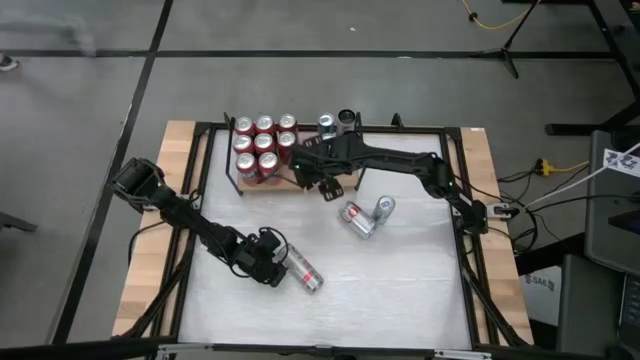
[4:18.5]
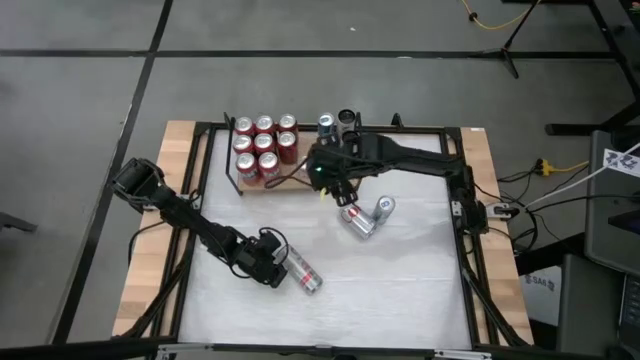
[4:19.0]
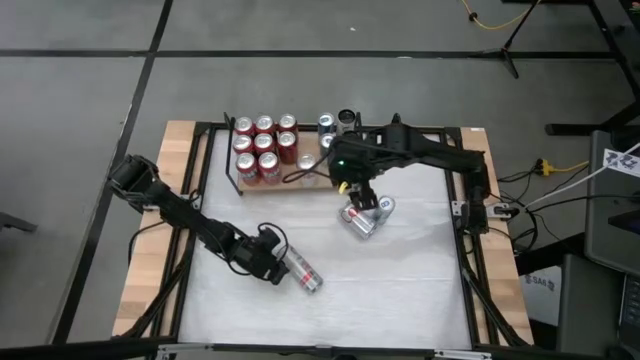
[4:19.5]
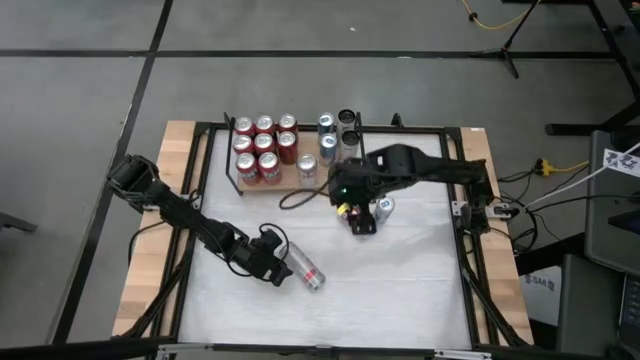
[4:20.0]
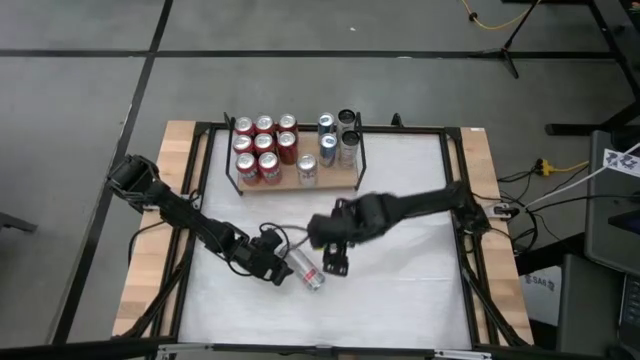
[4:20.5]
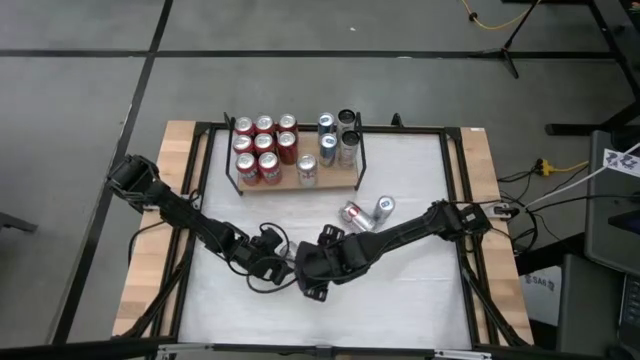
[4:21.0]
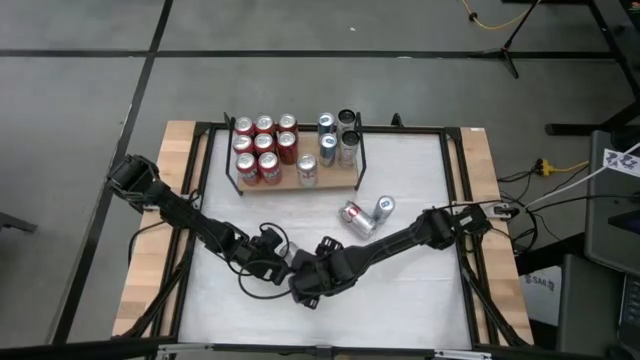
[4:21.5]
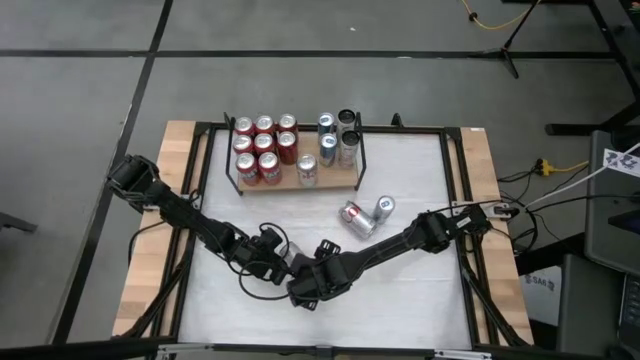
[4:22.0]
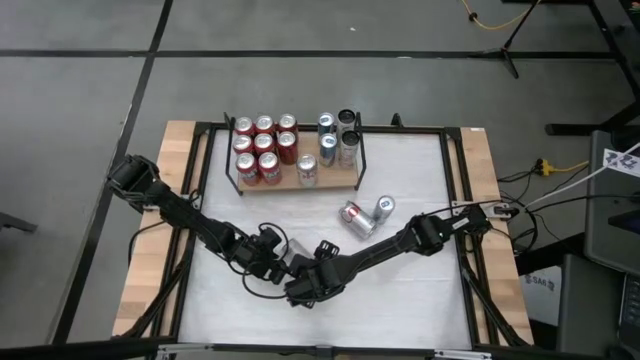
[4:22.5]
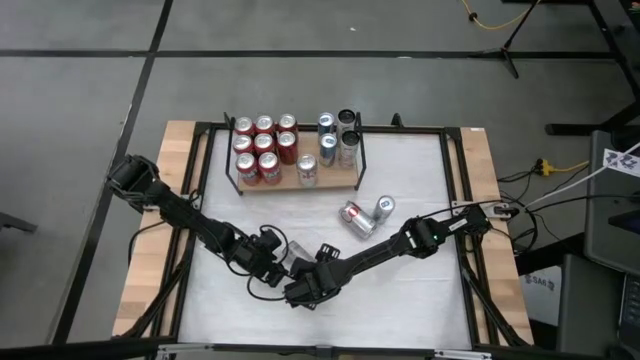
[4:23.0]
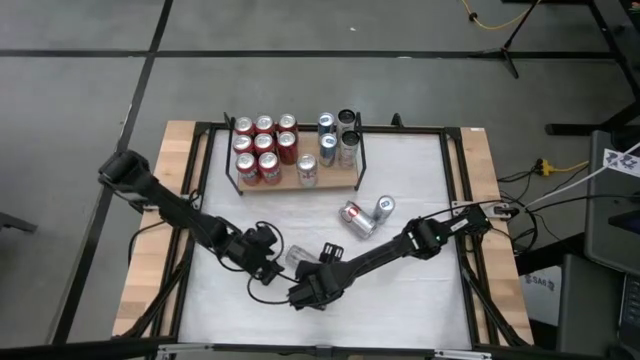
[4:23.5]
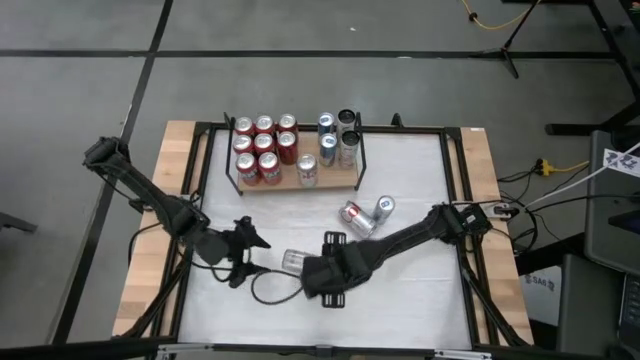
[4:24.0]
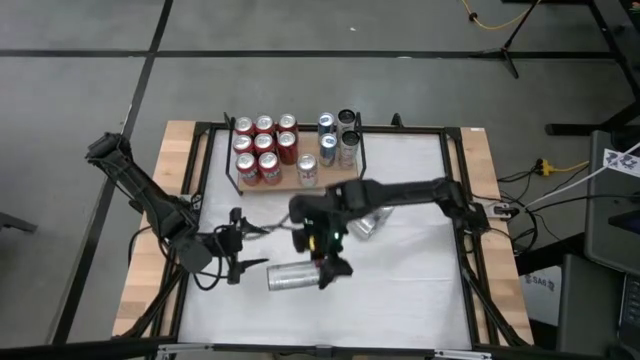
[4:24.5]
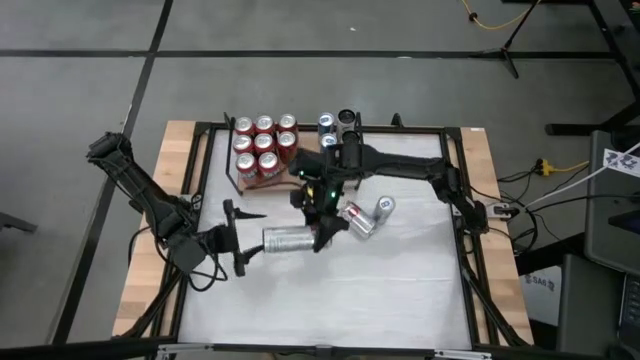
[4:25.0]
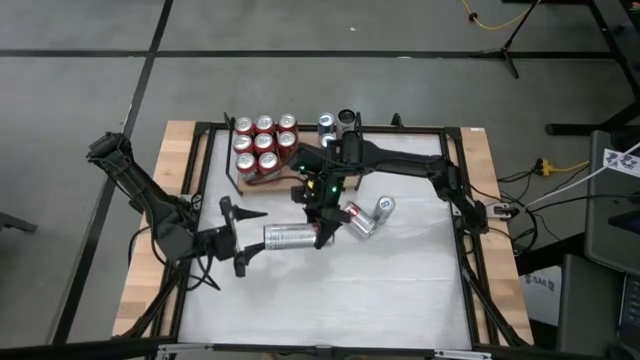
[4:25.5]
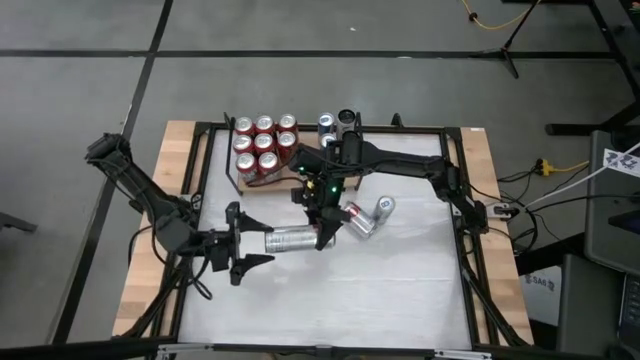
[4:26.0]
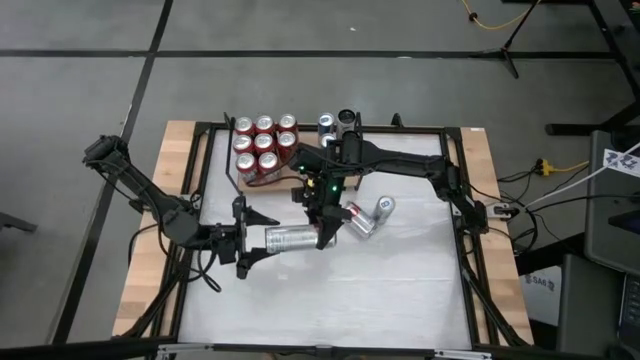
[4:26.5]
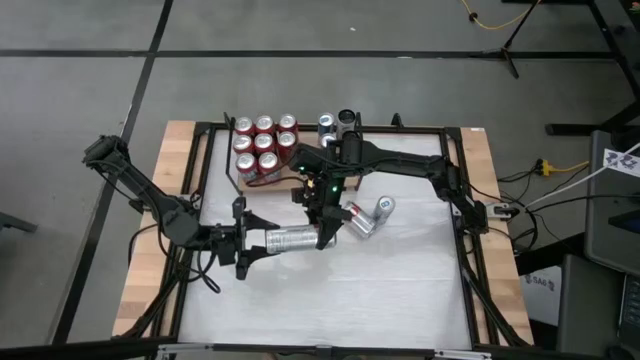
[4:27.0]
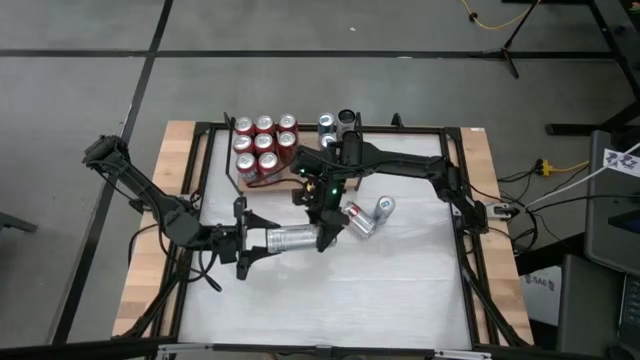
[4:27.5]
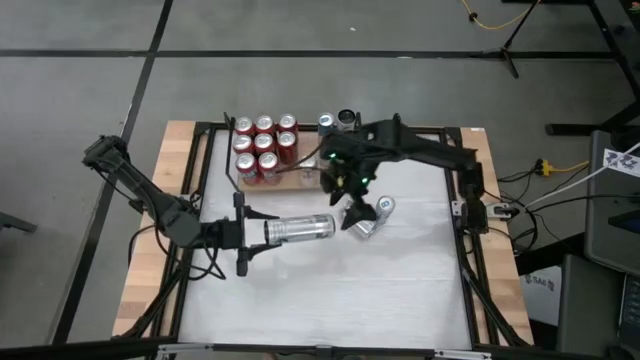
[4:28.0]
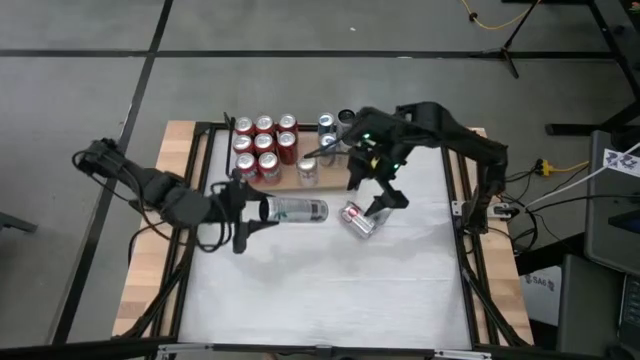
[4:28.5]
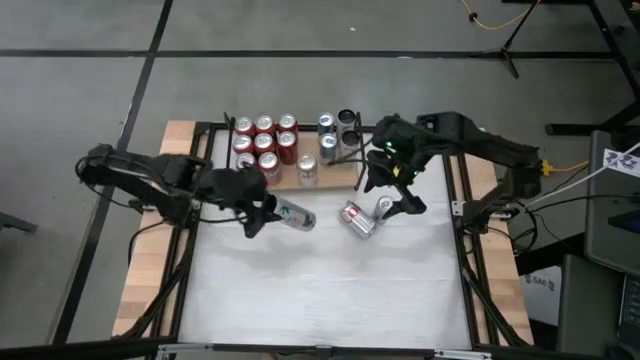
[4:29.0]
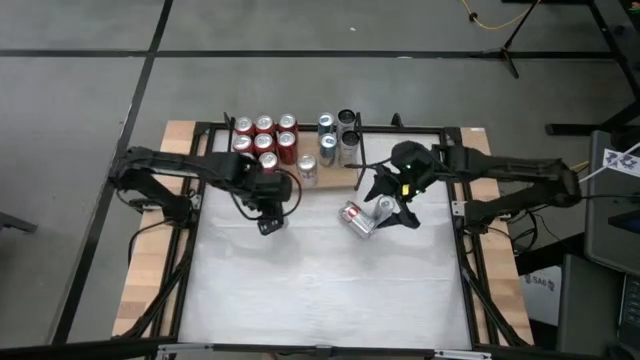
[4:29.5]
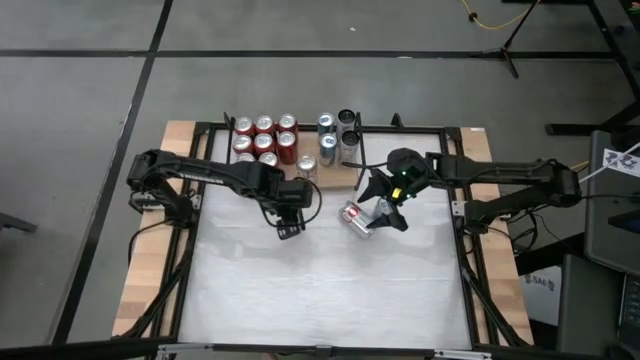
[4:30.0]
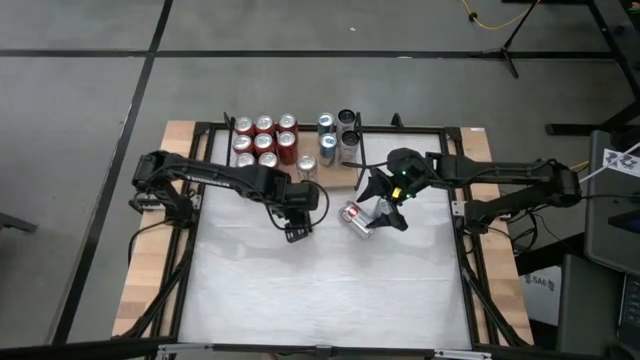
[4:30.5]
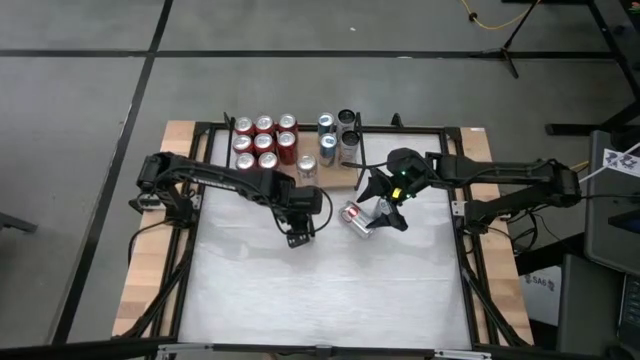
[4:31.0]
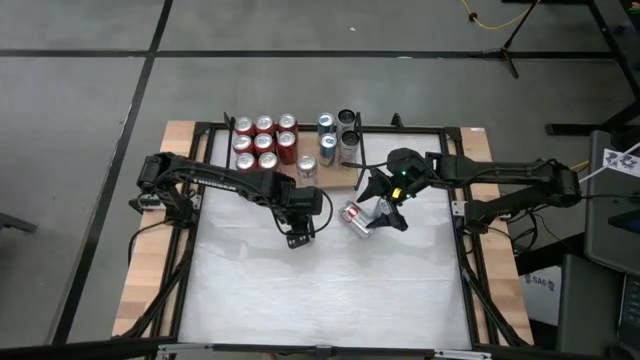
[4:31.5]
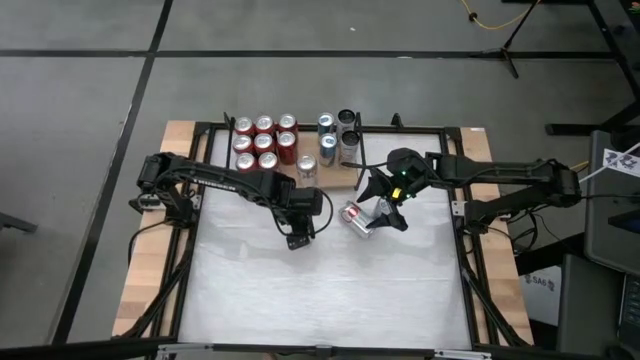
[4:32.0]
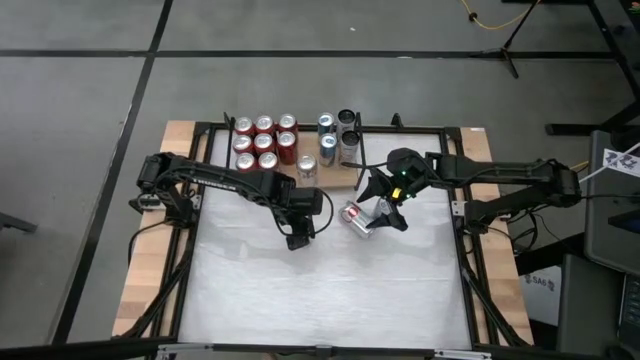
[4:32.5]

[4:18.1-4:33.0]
Task: Place canned beverage on shelf
Adjust the white pink soda can

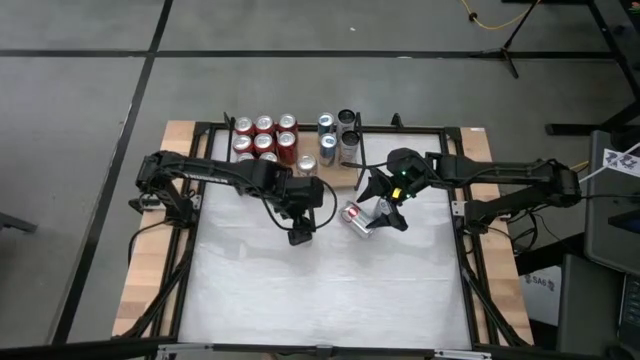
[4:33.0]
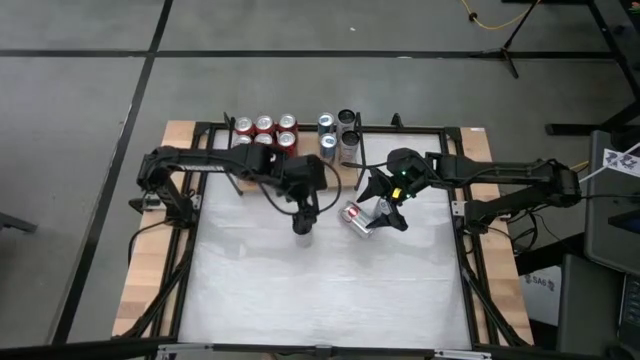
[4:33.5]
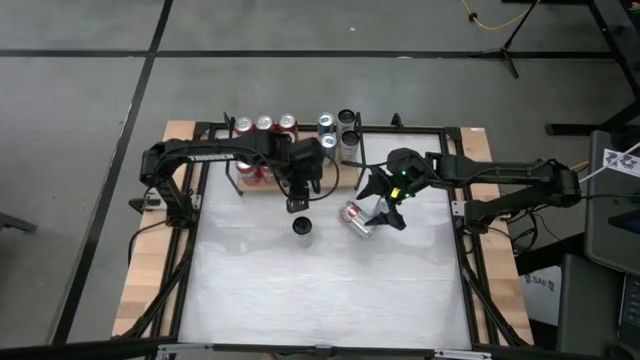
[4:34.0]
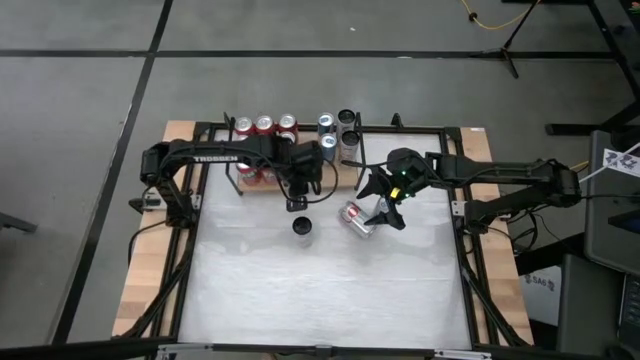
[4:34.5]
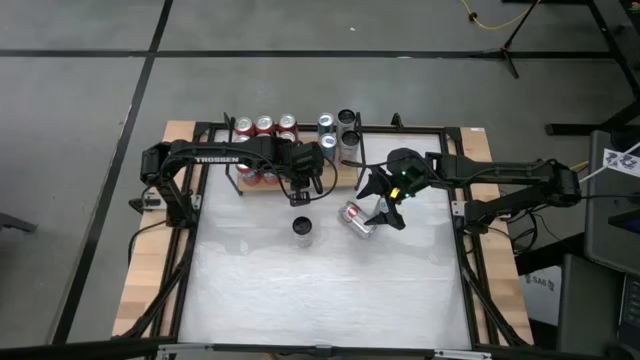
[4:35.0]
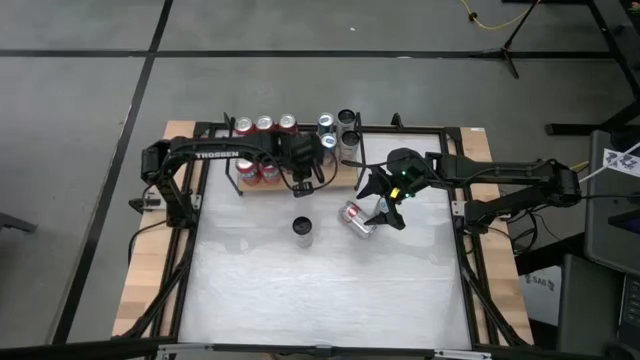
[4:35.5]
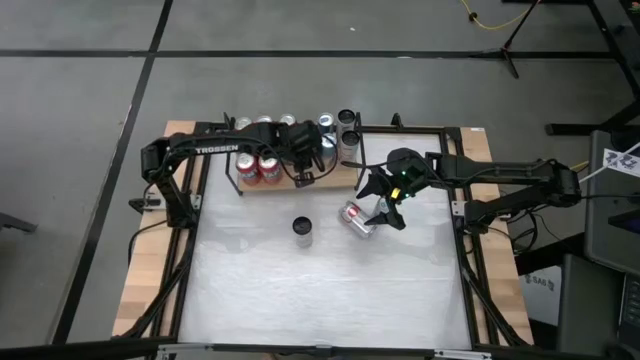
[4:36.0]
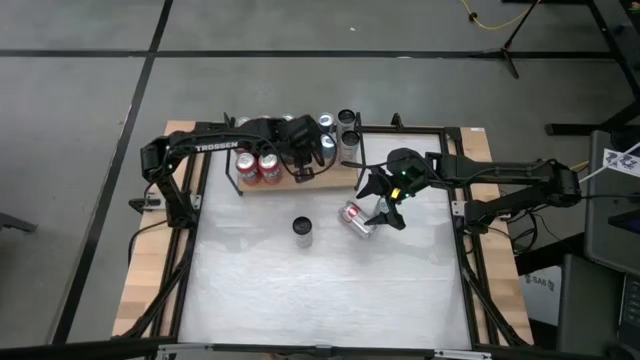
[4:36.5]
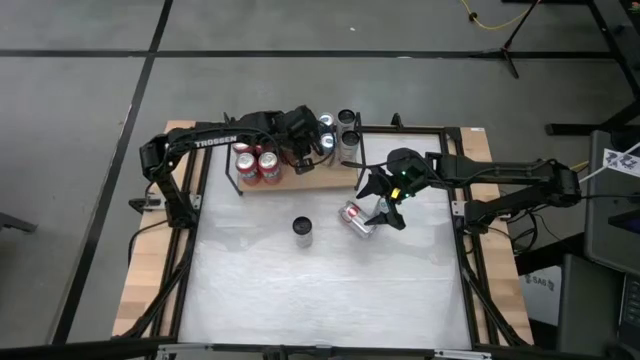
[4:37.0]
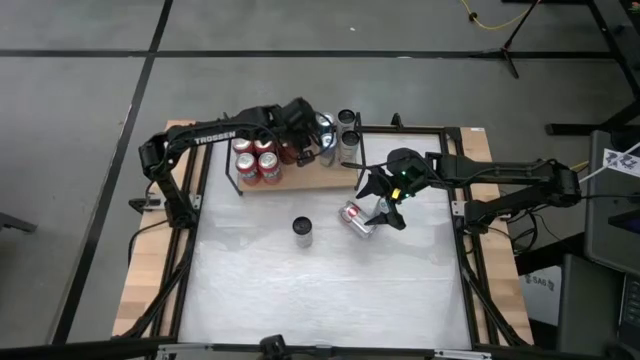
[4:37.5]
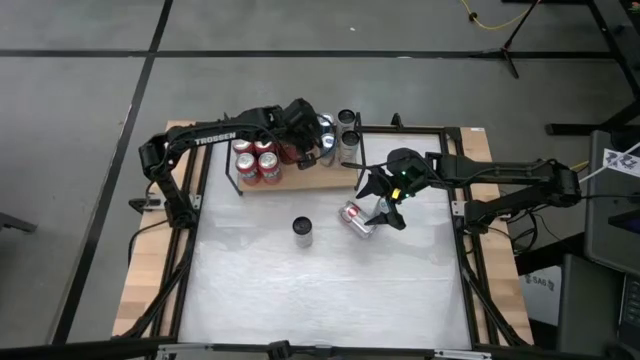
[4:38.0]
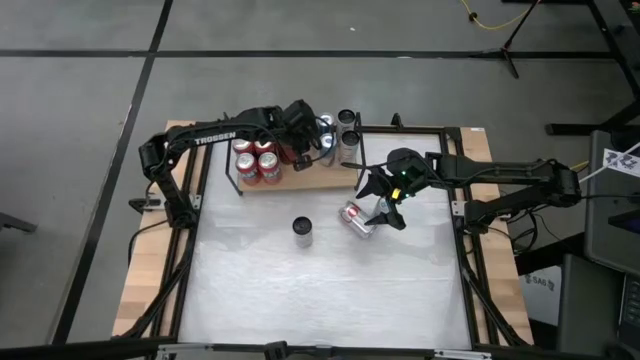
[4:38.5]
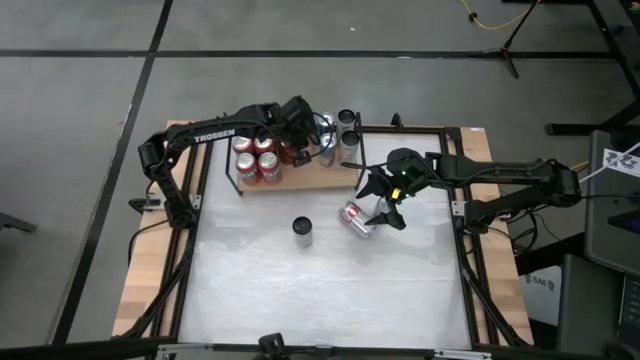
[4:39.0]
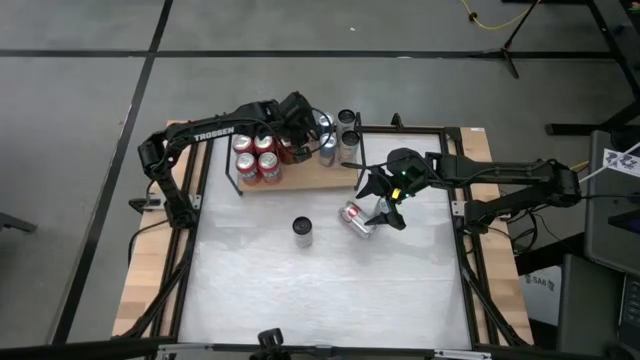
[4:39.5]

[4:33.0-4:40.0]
Adjust the red silver soda can on the shelf

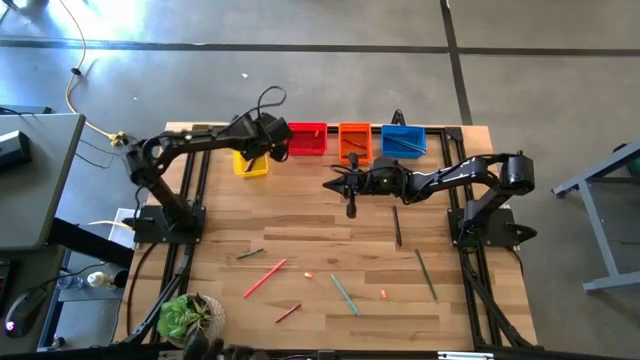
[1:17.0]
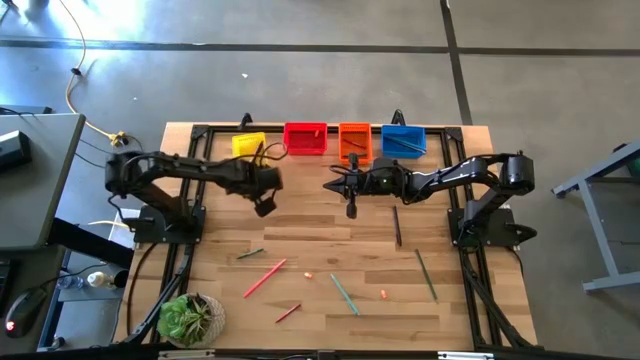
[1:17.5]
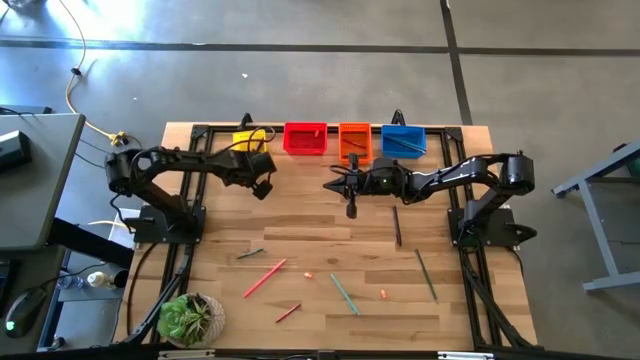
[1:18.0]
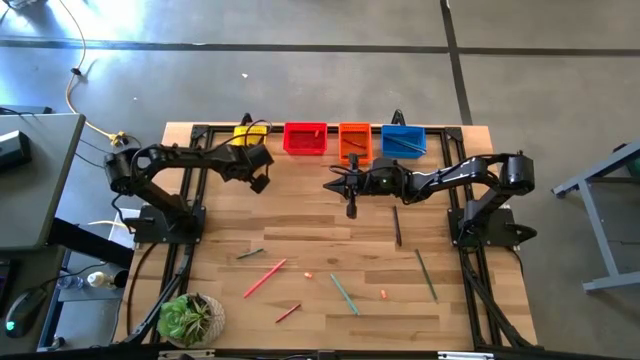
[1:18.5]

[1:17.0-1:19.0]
Task: Sort crayons/erasers/pens/pencils in bins
Adjust the yellow basket
